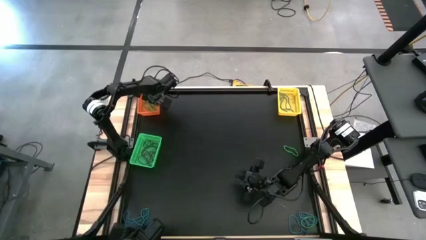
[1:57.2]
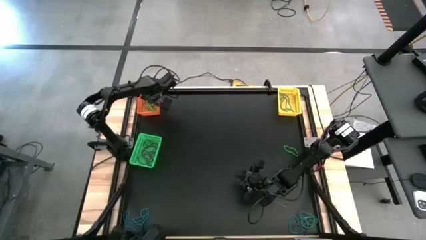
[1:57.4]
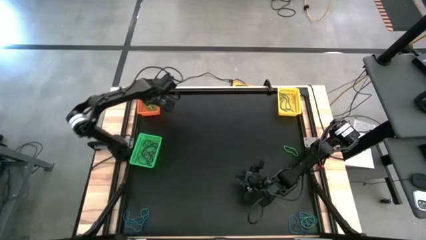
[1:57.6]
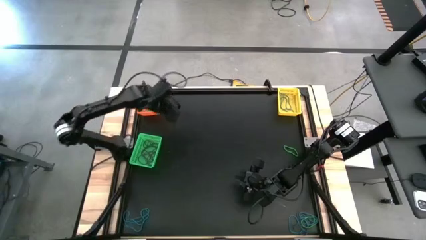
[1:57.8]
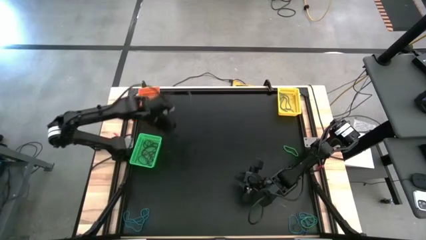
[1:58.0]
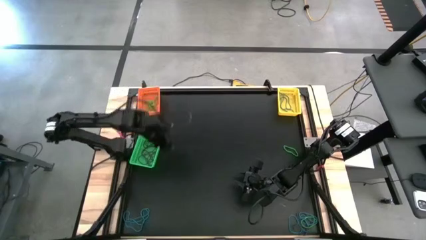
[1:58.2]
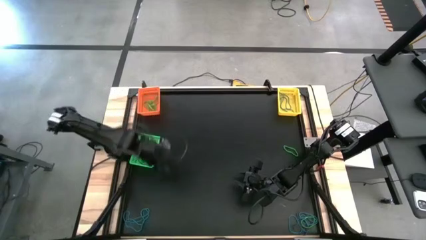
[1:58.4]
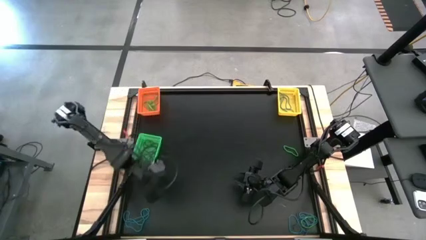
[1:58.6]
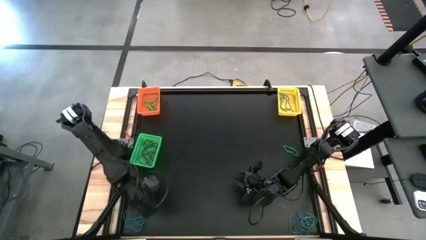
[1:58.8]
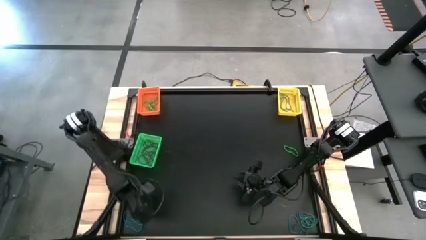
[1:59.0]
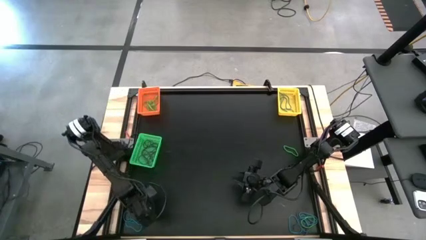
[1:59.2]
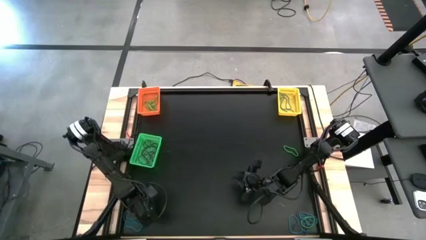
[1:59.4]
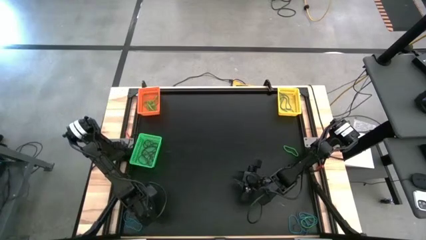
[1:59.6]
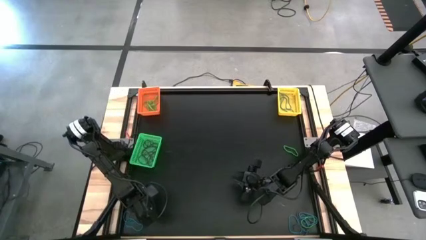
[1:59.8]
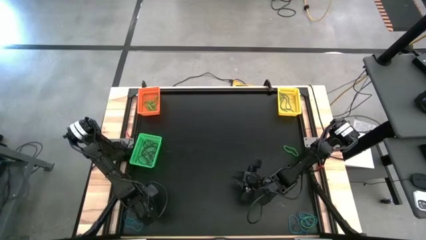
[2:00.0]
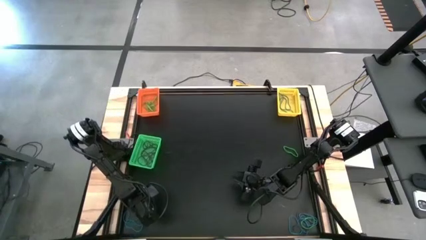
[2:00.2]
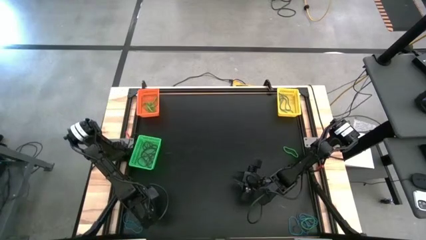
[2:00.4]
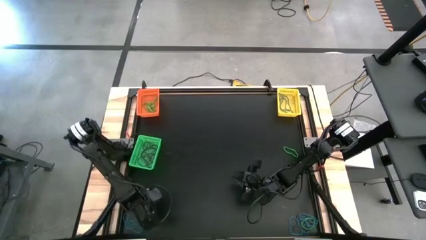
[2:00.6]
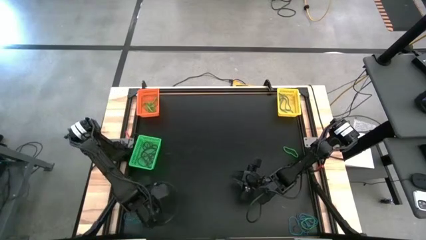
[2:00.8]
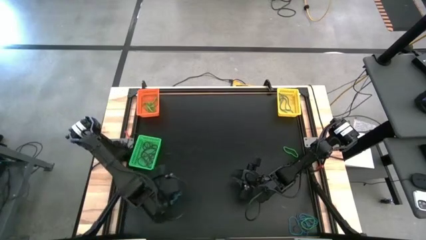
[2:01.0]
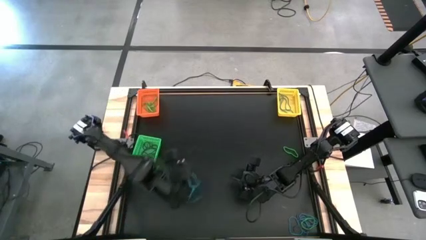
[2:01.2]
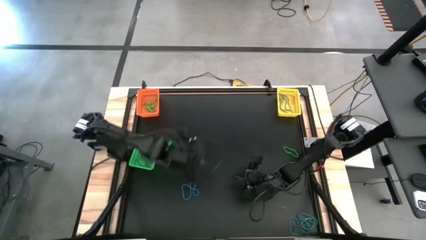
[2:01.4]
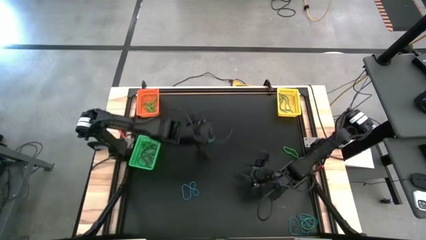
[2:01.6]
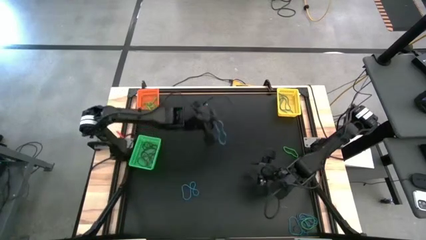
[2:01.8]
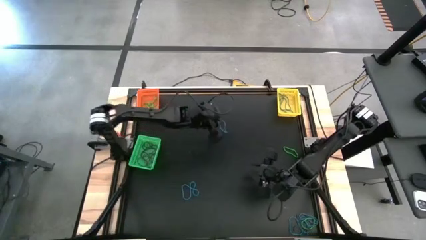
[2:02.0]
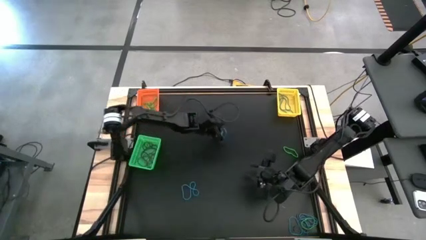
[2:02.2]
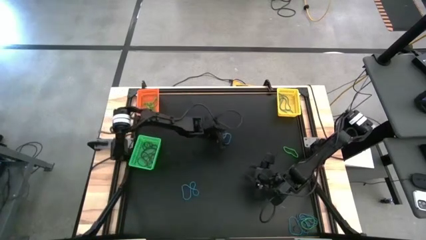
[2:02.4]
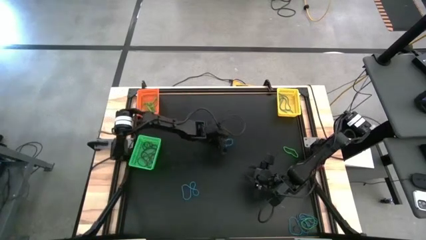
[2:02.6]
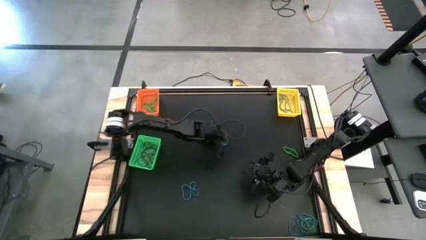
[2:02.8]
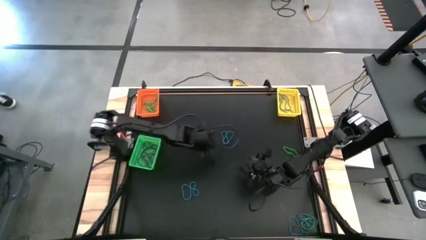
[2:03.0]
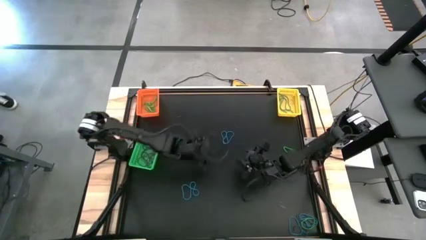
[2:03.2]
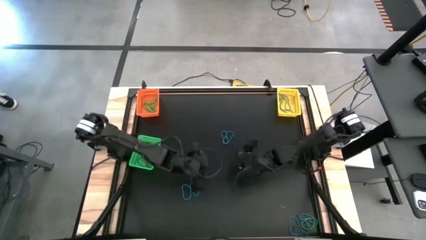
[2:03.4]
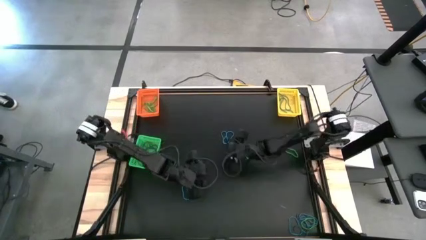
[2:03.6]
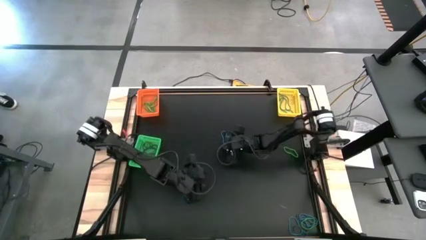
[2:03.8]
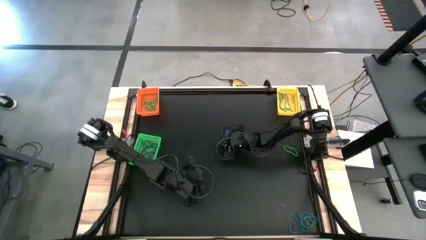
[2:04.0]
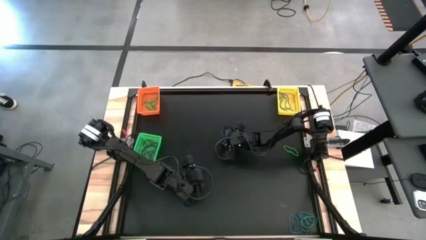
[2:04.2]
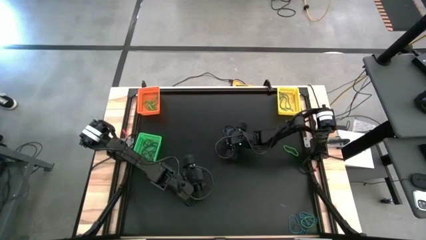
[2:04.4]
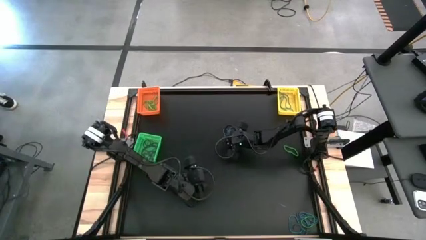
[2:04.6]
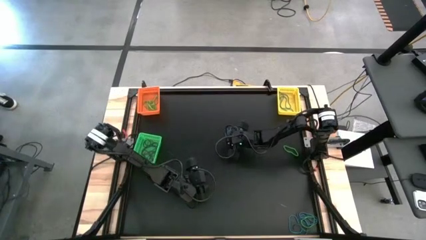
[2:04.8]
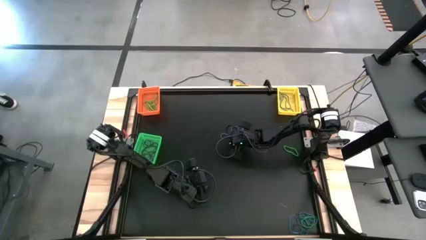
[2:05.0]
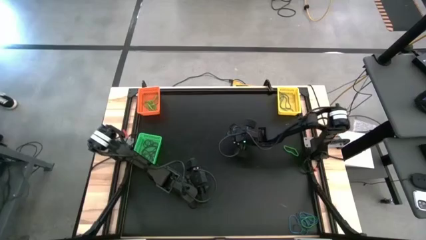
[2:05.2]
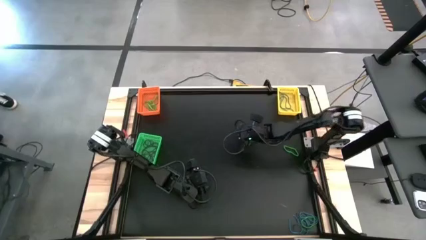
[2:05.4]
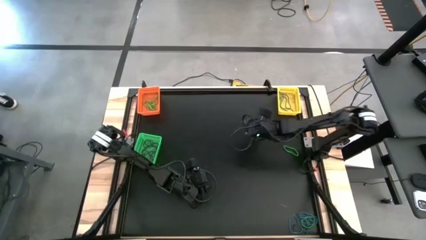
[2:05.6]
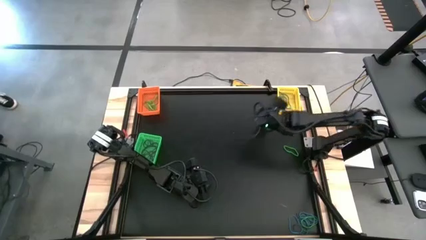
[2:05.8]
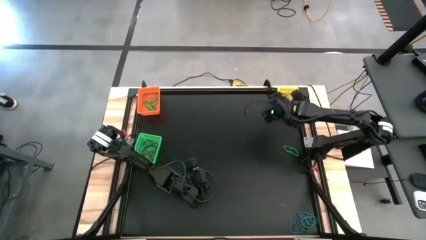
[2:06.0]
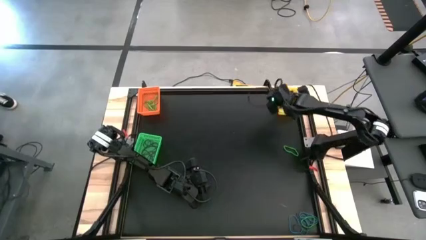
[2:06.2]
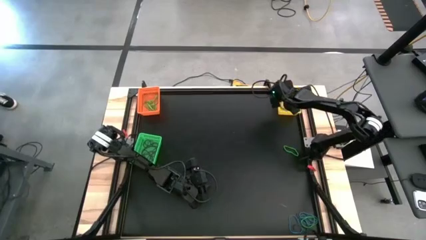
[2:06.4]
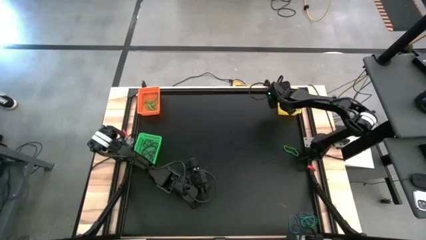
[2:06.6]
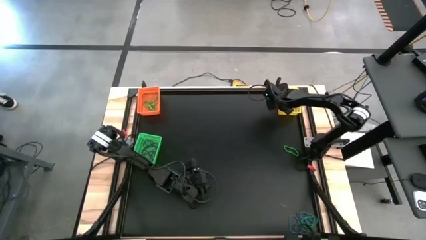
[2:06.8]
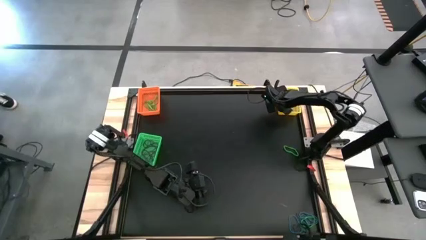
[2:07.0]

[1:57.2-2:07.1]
Task: Sort rubber bands into baskets
Put the bottom left blue rubber band into the yellow bin

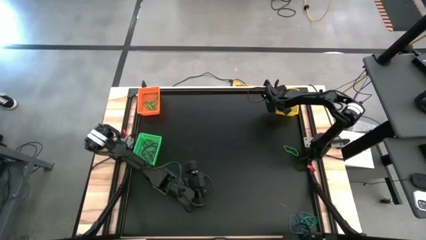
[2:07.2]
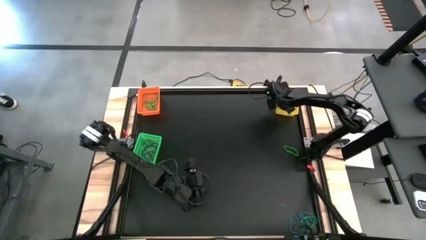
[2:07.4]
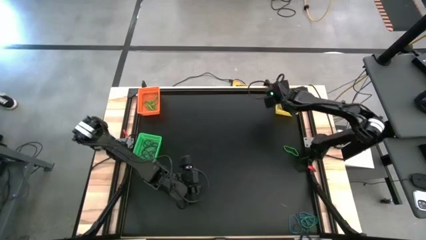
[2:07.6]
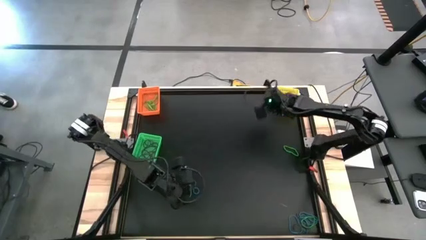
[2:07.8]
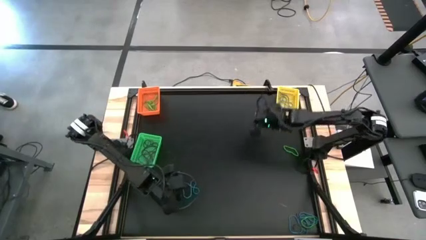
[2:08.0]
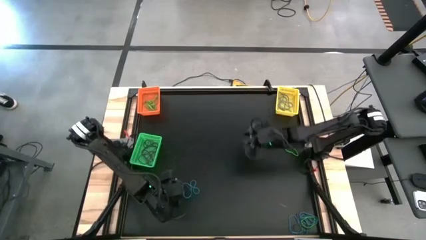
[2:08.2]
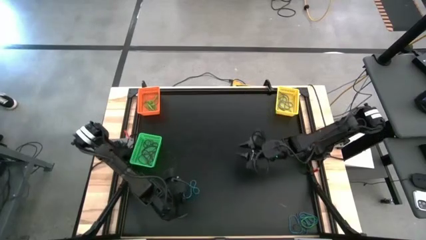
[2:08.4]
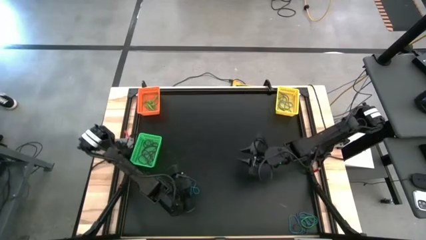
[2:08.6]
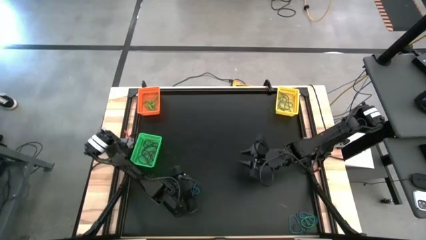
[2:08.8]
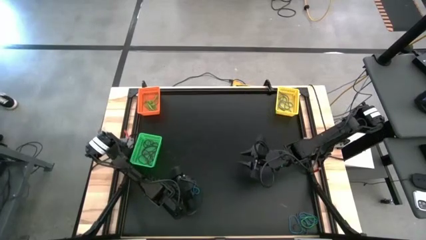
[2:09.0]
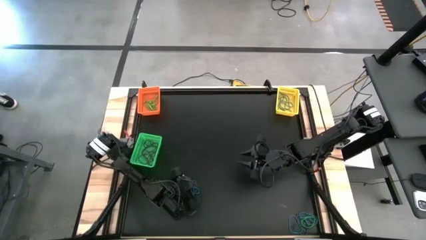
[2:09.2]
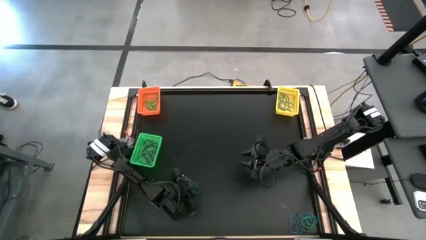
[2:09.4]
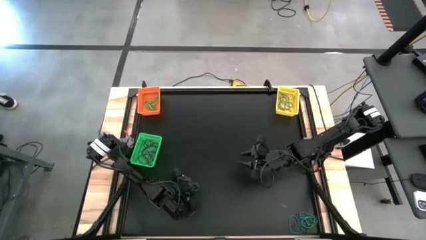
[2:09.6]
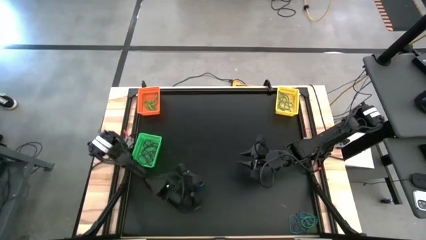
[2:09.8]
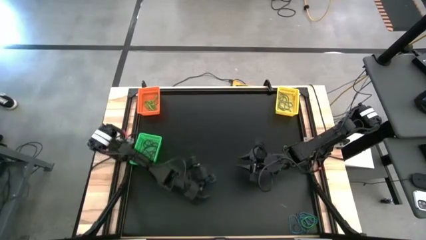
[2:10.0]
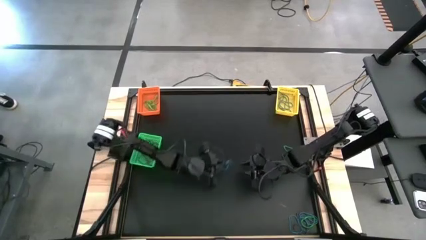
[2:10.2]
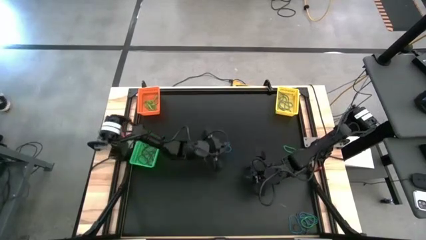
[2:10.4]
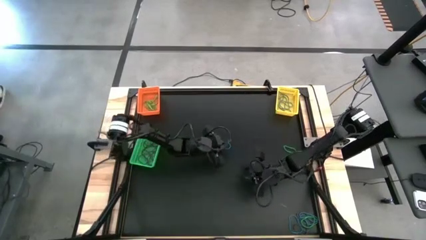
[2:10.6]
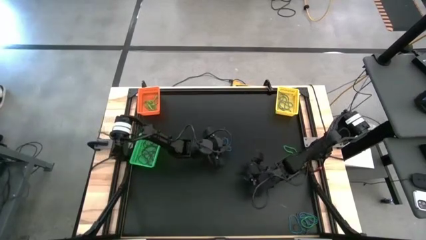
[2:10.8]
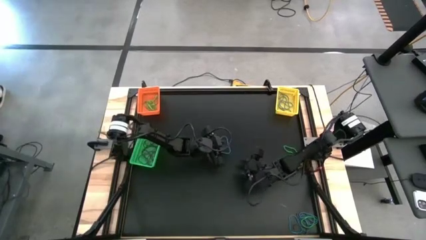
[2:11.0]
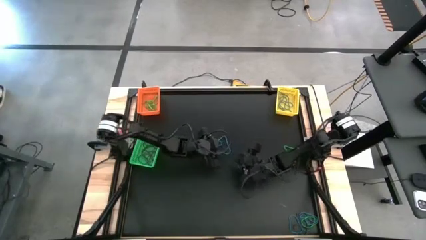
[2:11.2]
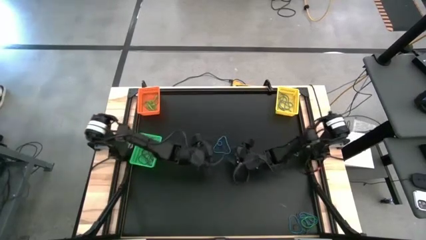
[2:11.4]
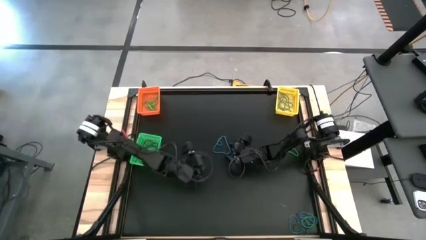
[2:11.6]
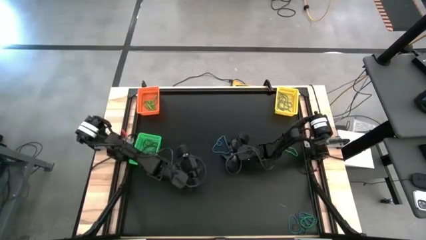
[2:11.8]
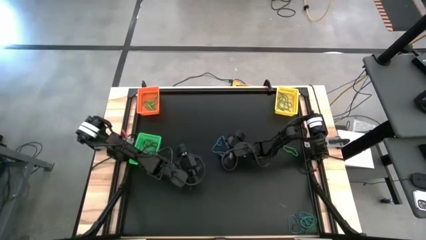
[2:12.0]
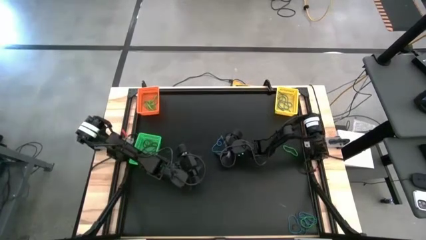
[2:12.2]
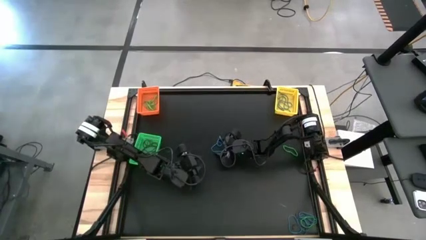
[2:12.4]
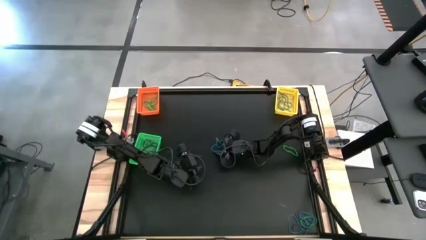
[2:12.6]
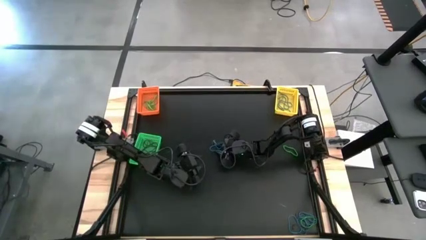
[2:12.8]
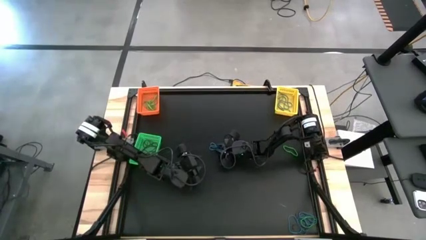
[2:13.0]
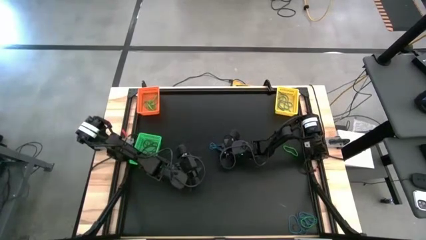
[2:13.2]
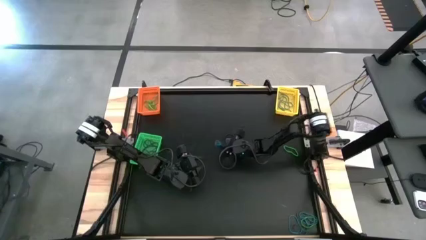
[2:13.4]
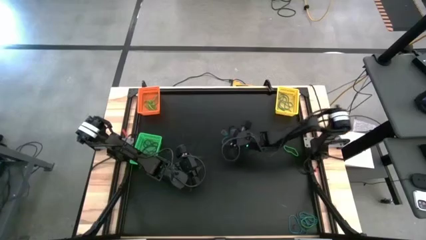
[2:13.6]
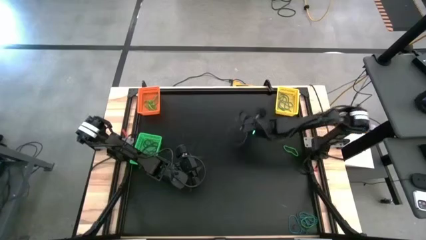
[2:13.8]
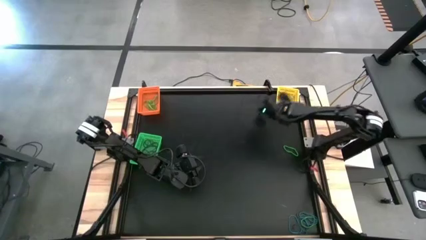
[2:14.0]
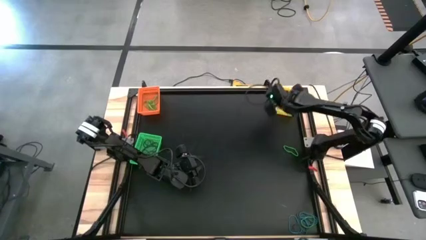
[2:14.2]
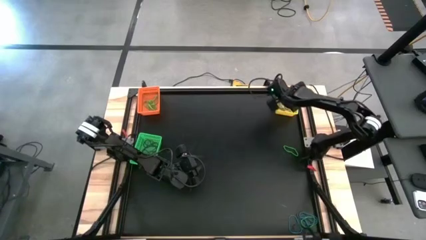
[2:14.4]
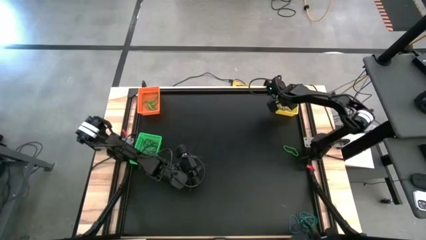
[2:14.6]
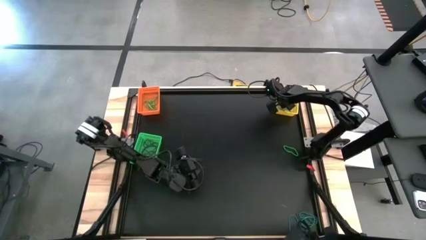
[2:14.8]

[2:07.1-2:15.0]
Put the bottom left blue rubber band into the yellow bin
